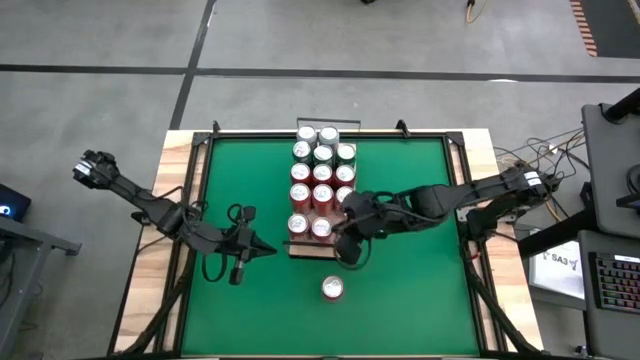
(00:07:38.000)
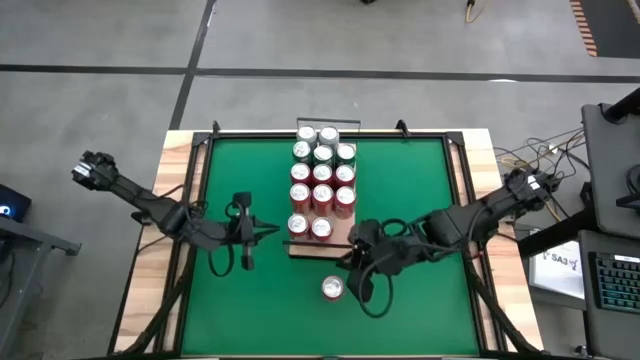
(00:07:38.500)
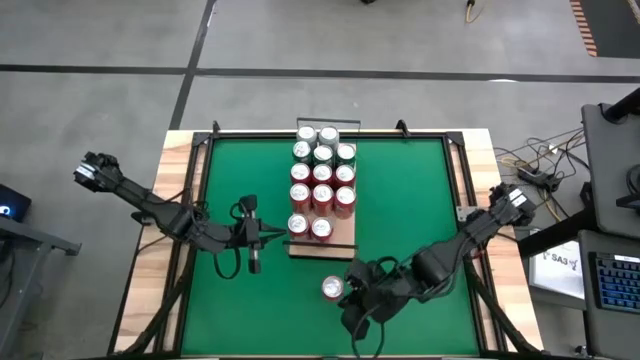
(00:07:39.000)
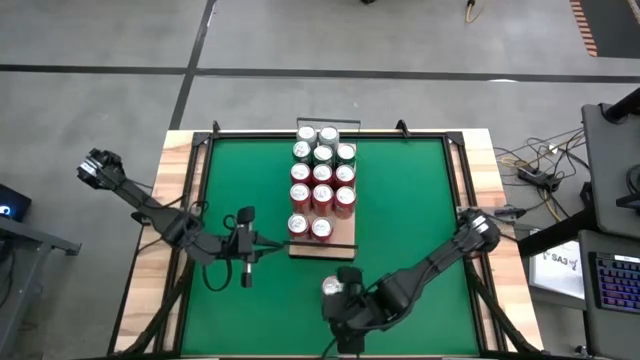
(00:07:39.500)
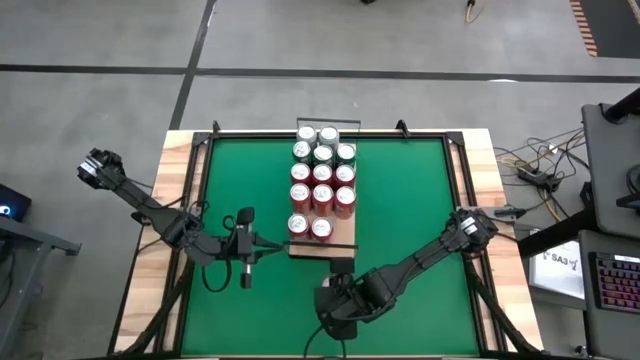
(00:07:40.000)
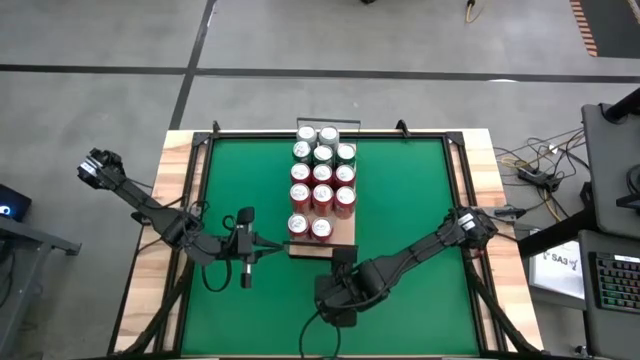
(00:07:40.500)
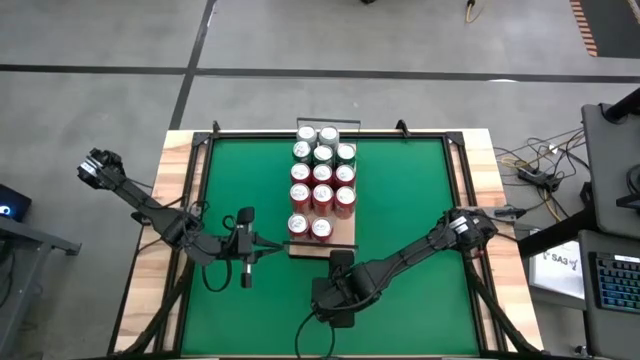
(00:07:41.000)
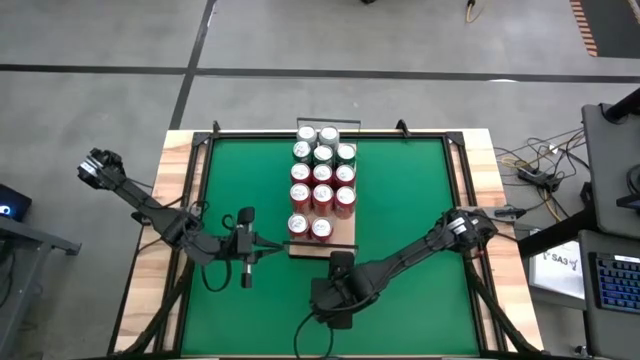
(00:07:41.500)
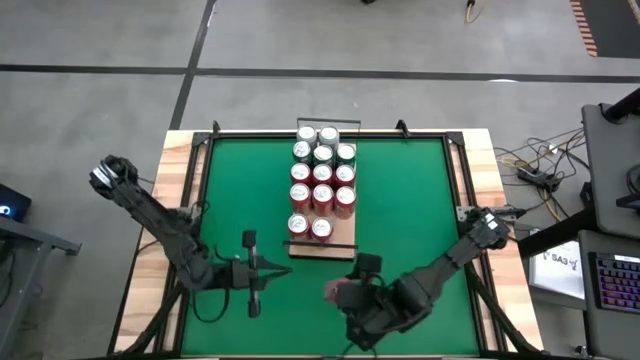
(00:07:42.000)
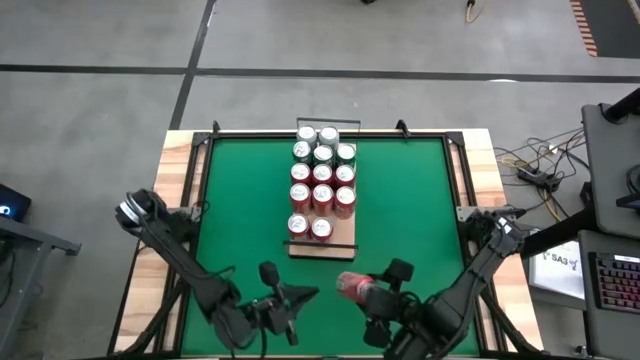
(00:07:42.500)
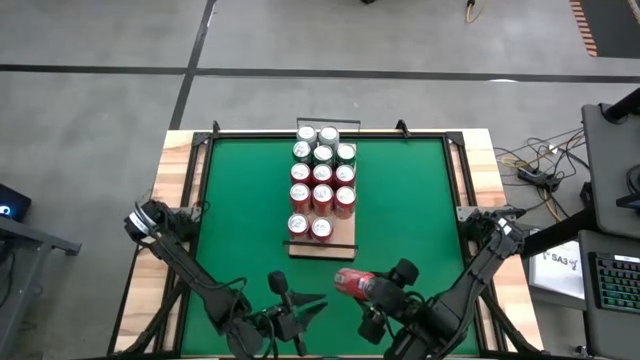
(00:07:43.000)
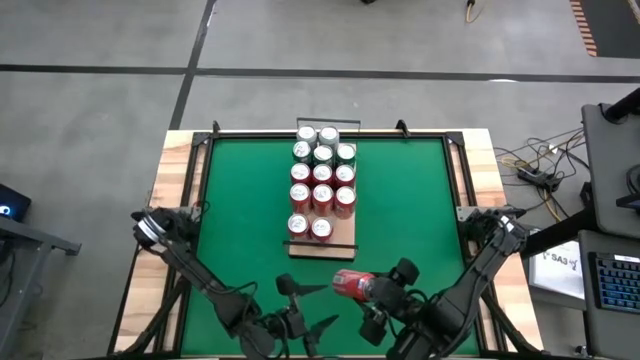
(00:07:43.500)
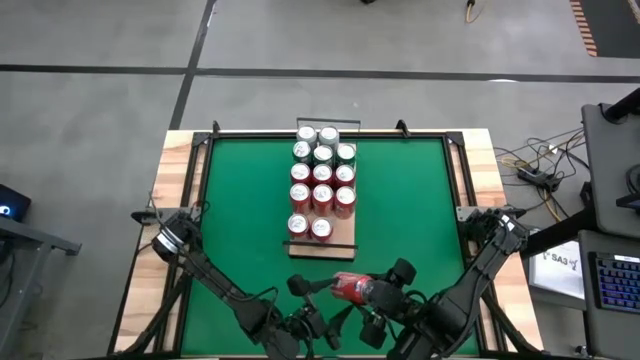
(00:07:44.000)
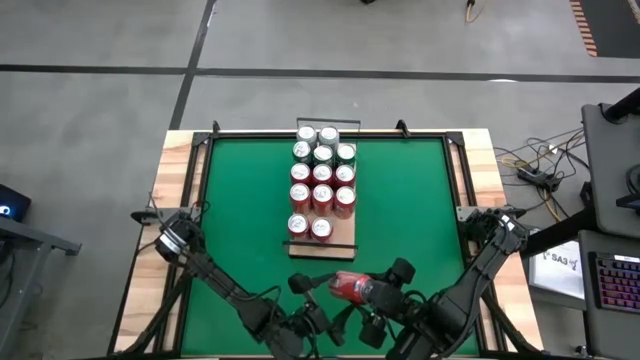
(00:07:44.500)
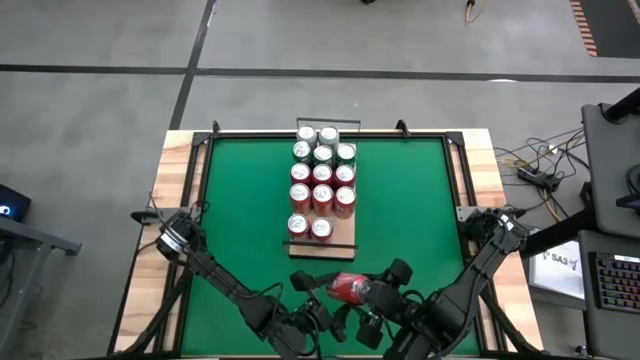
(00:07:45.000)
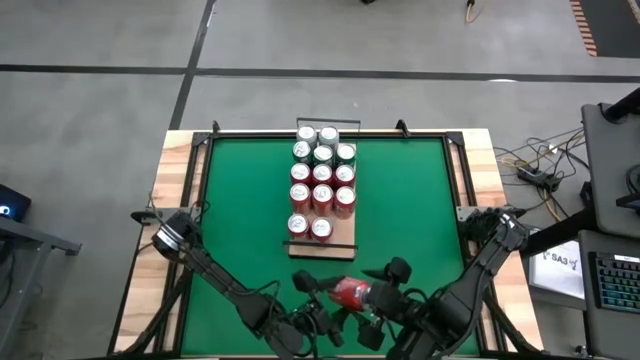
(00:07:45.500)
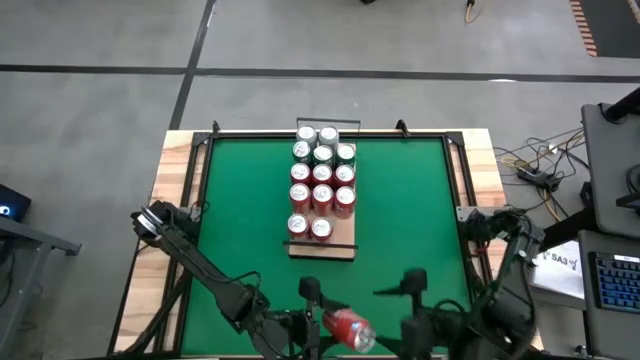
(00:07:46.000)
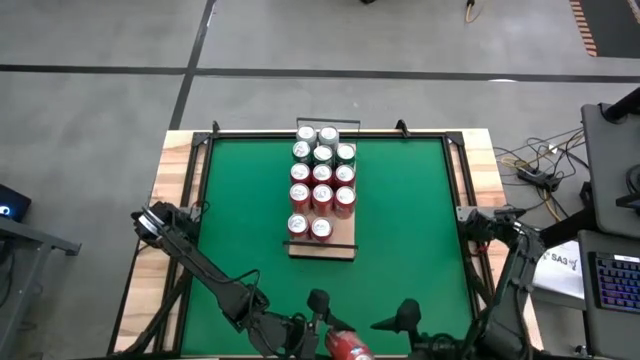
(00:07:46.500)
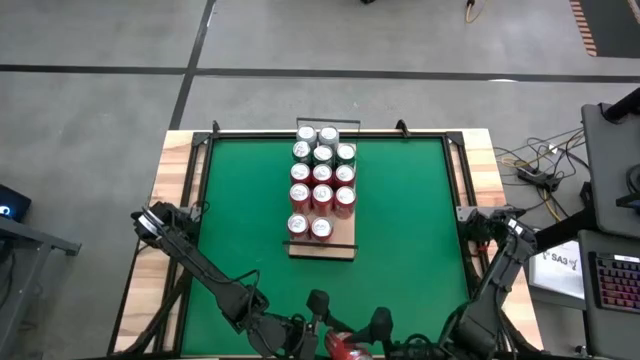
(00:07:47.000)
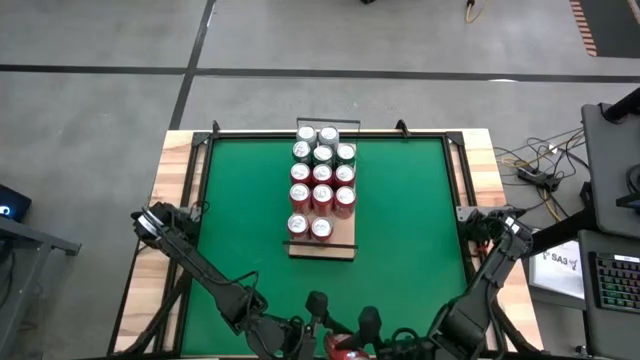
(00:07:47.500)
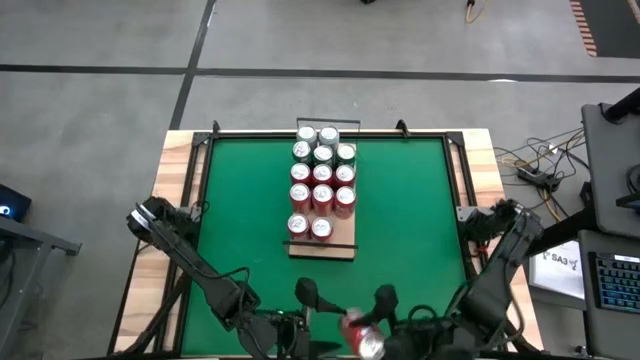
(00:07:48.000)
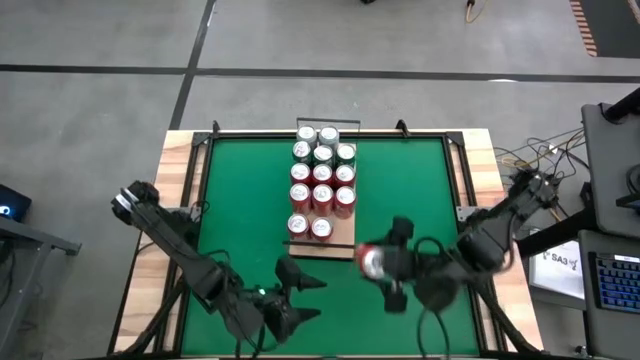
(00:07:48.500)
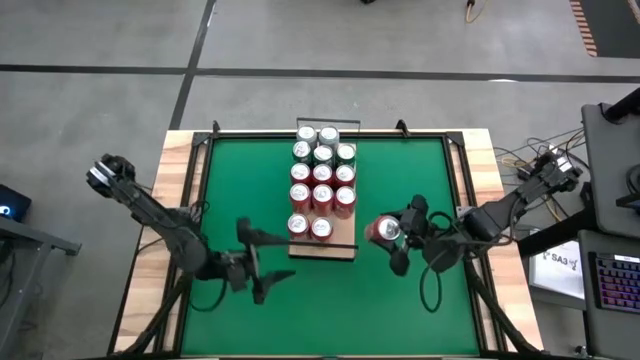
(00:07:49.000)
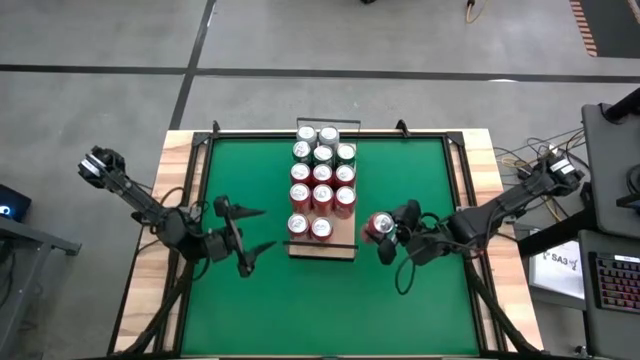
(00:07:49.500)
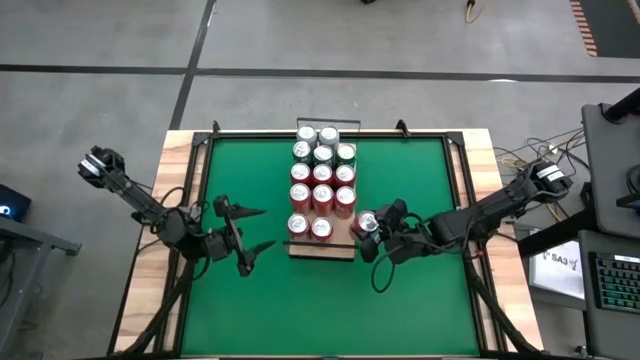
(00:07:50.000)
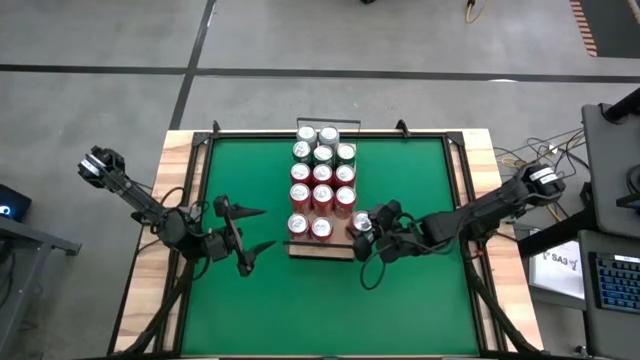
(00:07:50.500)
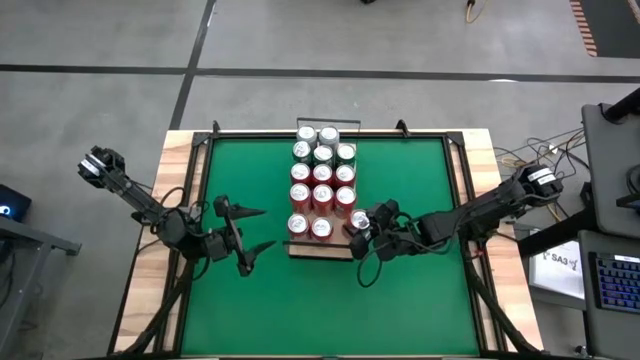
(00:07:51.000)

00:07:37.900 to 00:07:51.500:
Task: Place canned beverage on shelf
Put the orange soda can on the shelf and aligned with the other orange soda can

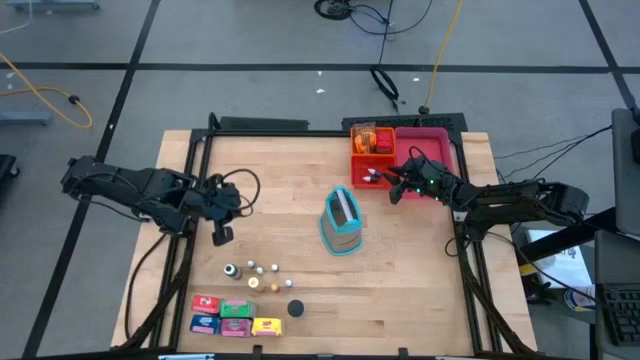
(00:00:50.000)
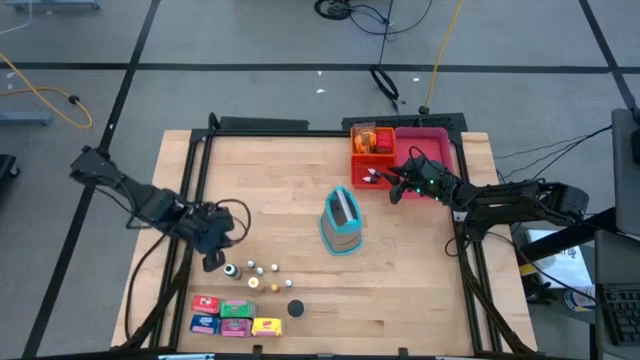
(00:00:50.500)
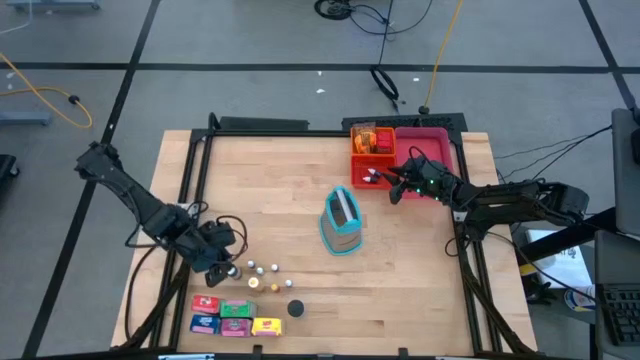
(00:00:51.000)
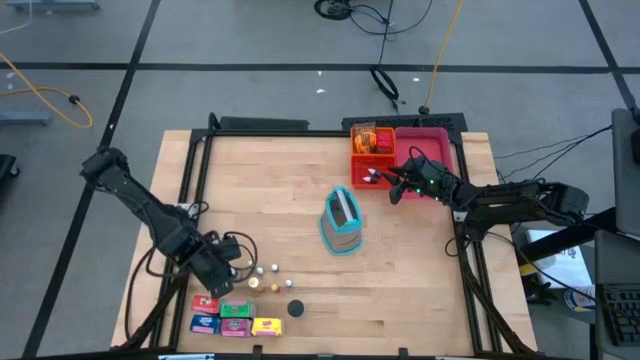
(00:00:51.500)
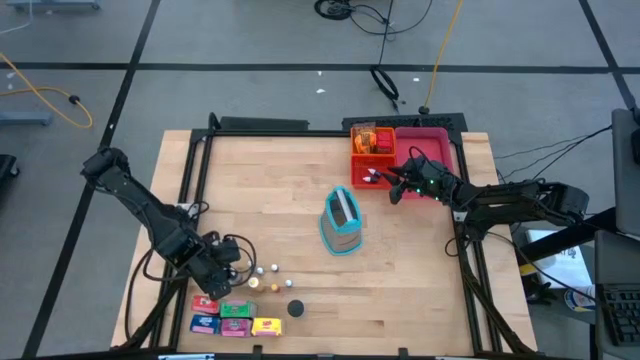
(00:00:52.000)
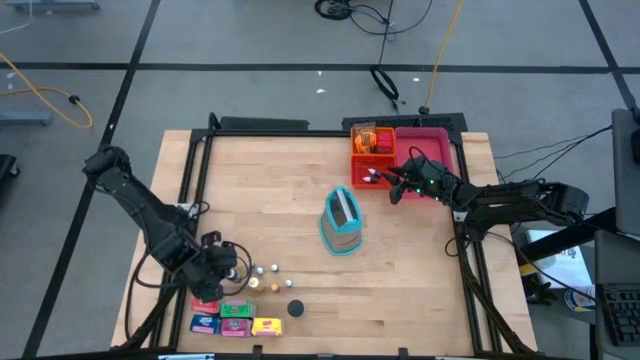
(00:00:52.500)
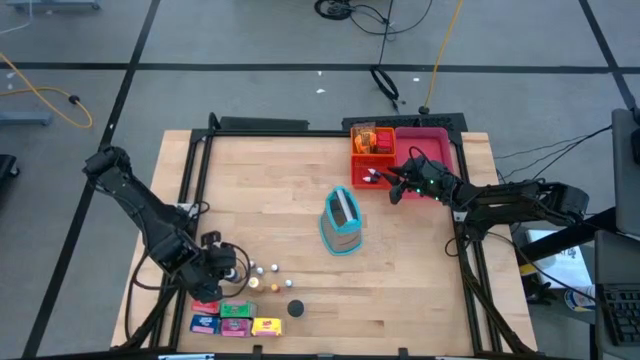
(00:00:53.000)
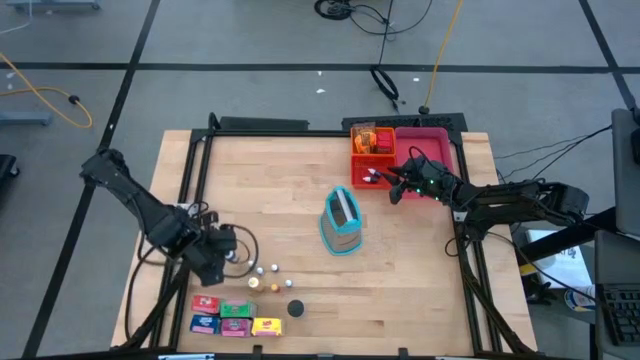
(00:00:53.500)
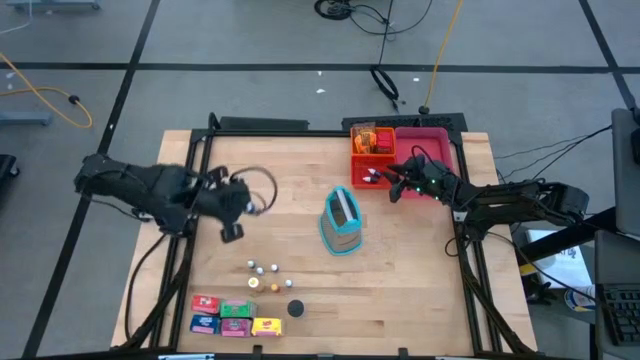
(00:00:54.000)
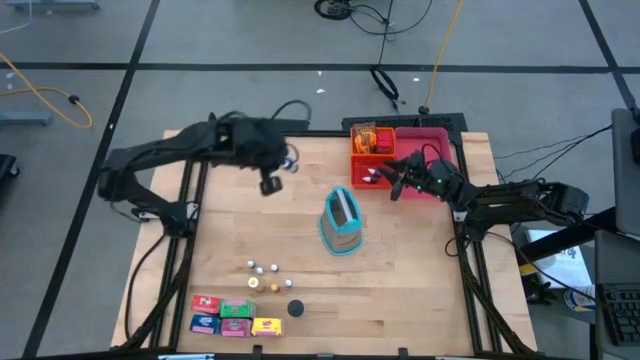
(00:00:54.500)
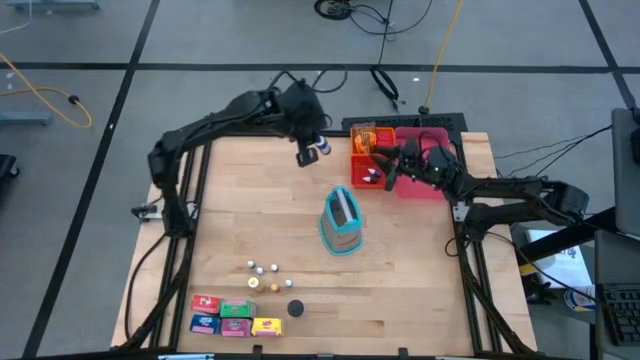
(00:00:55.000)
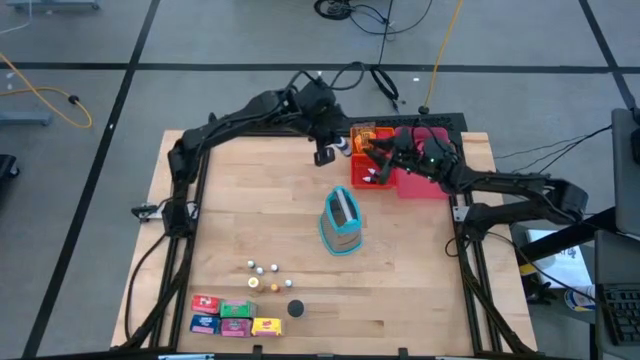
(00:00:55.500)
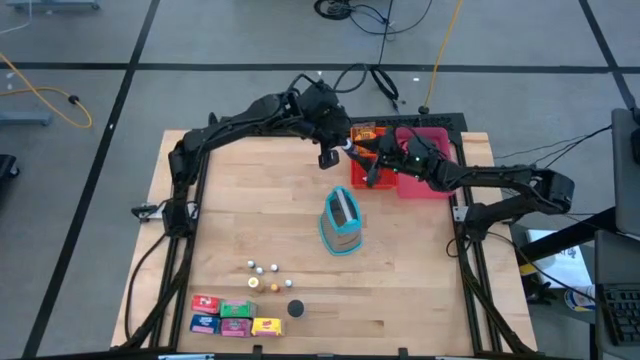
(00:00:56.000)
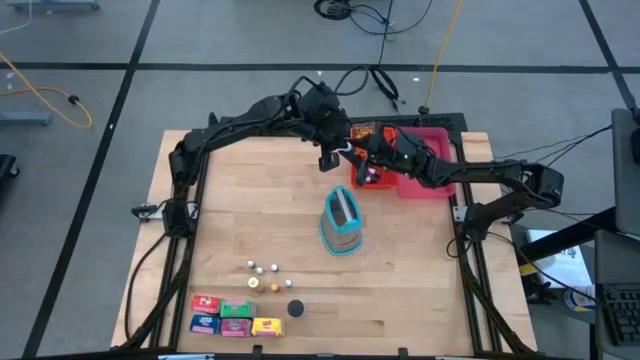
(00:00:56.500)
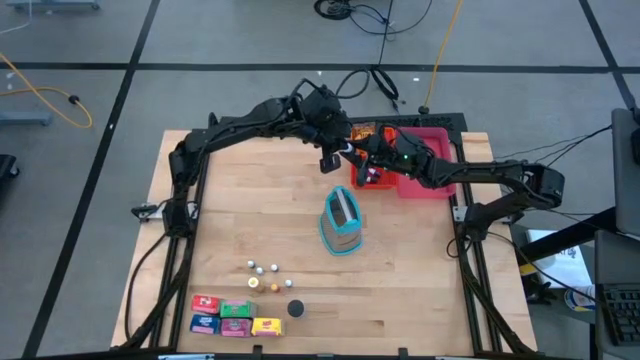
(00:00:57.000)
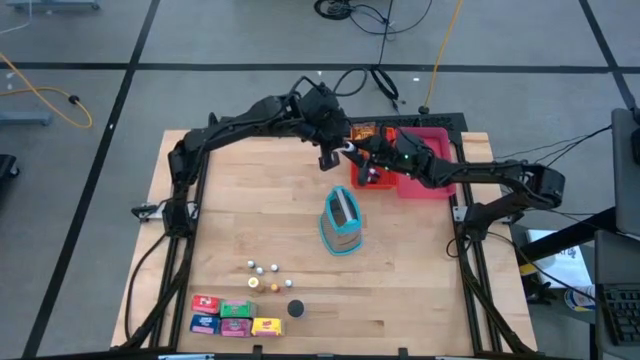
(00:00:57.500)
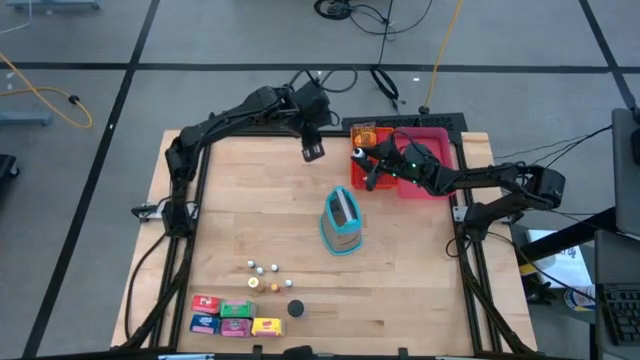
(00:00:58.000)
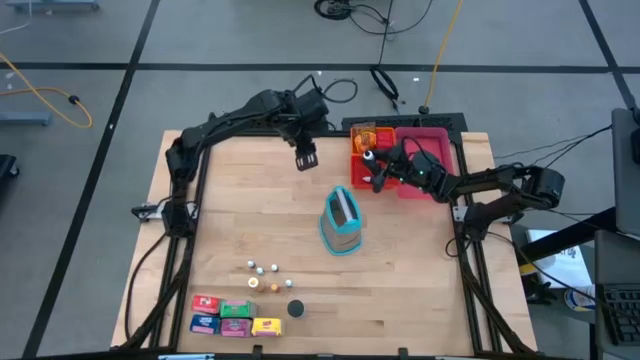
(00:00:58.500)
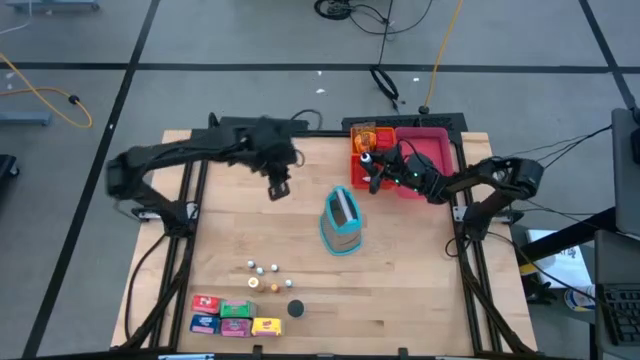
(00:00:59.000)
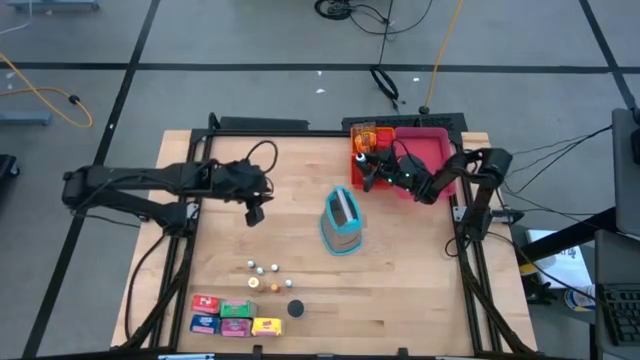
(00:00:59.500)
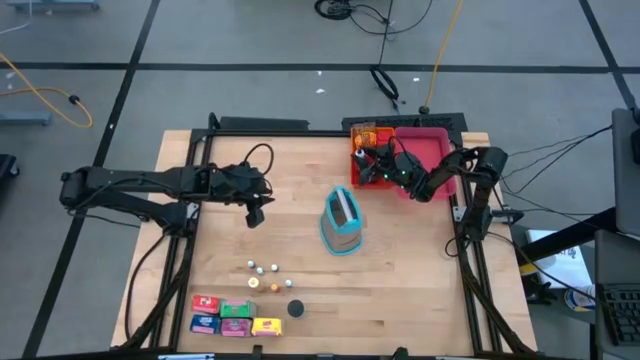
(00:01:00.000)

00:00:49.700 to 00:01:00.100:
Task: Pick & Place Kitchen Items
Put the large black food coloring bottle into the red bin
